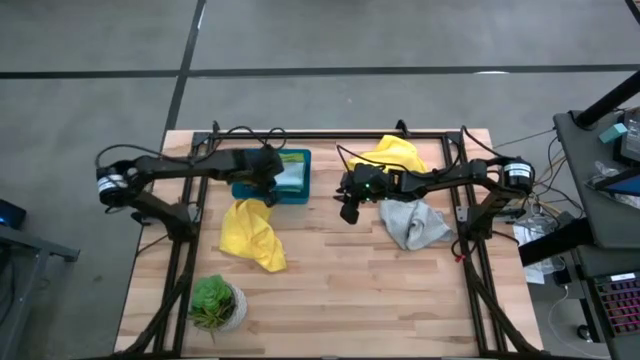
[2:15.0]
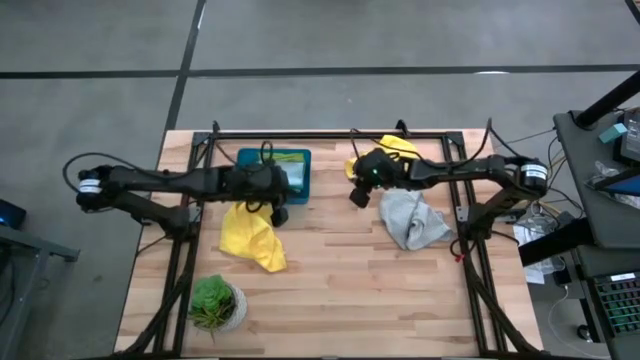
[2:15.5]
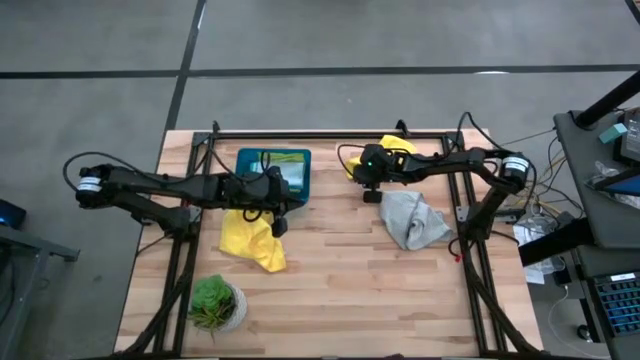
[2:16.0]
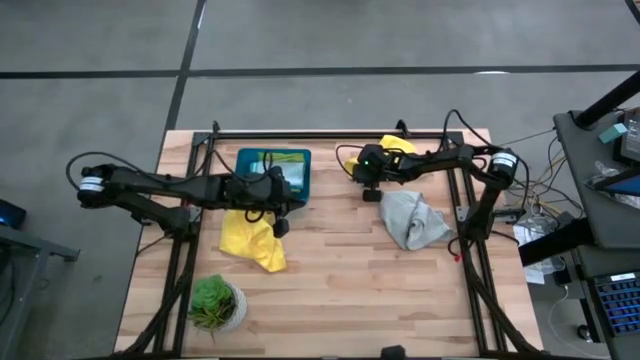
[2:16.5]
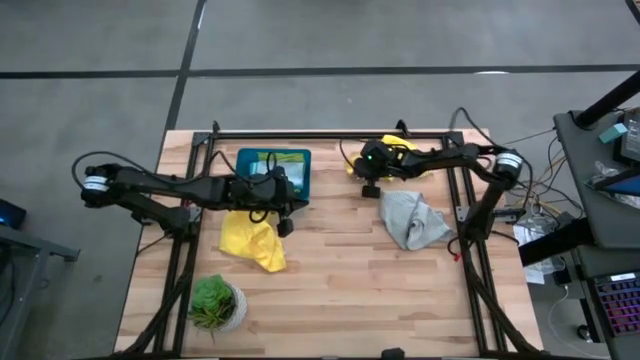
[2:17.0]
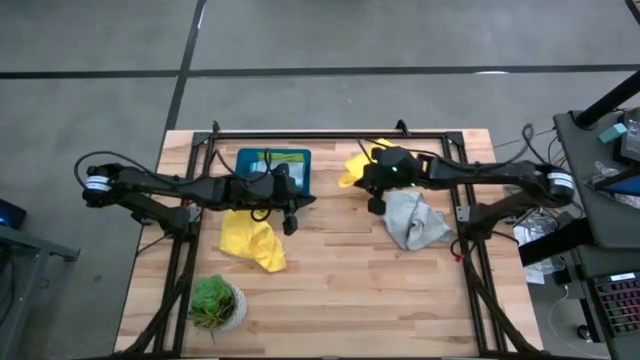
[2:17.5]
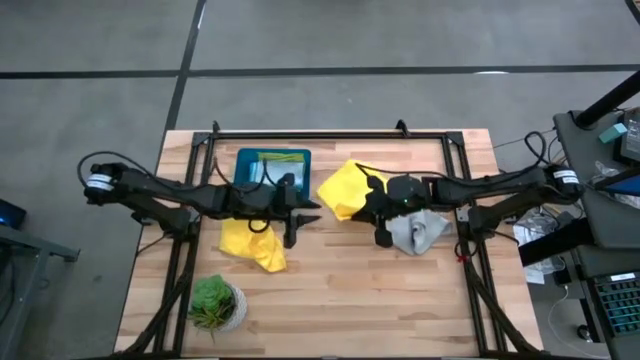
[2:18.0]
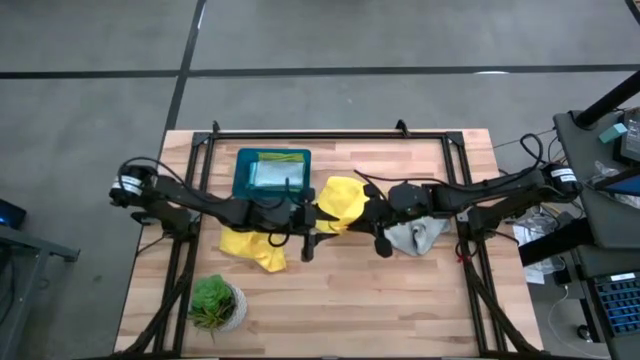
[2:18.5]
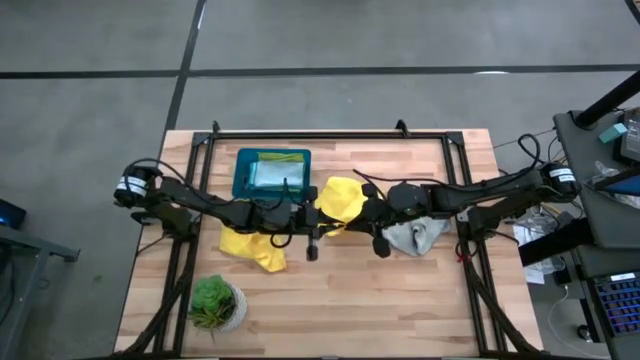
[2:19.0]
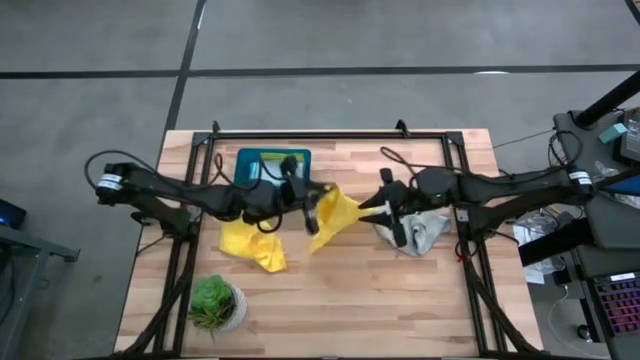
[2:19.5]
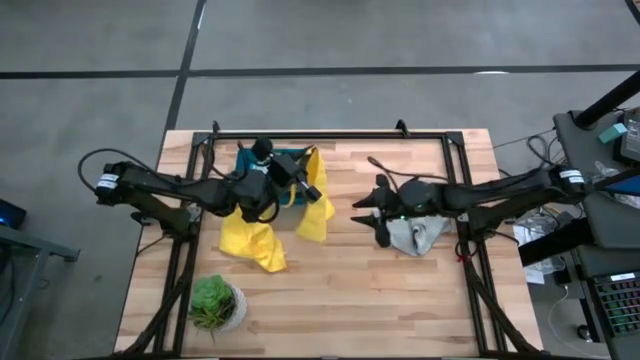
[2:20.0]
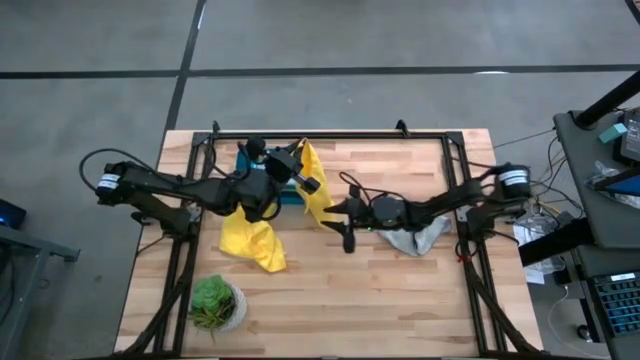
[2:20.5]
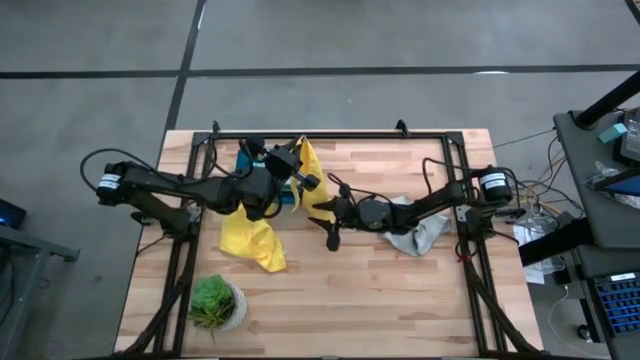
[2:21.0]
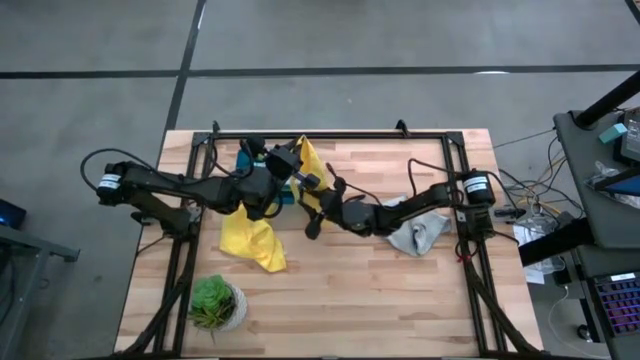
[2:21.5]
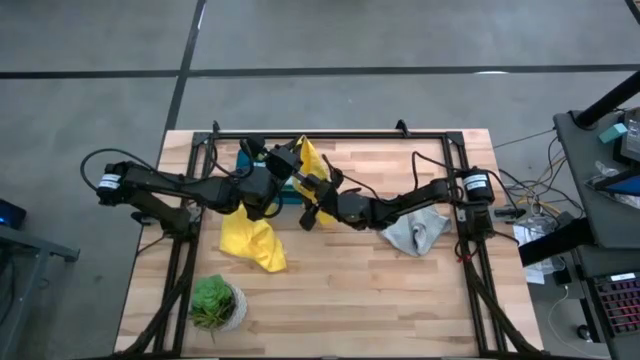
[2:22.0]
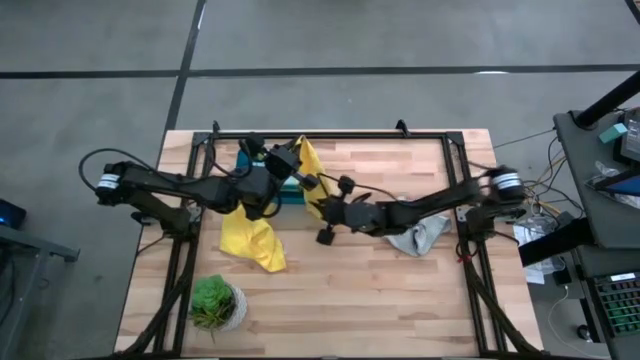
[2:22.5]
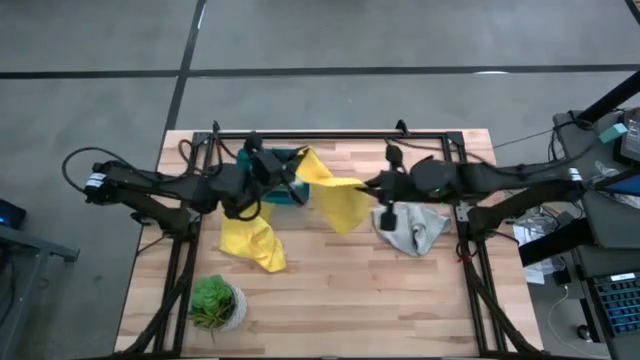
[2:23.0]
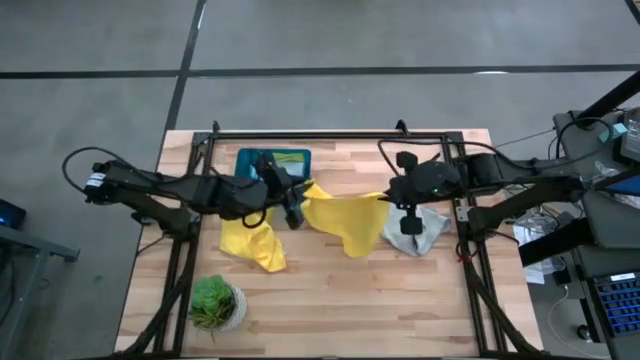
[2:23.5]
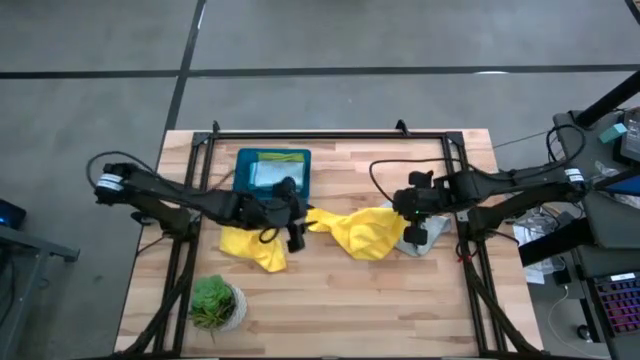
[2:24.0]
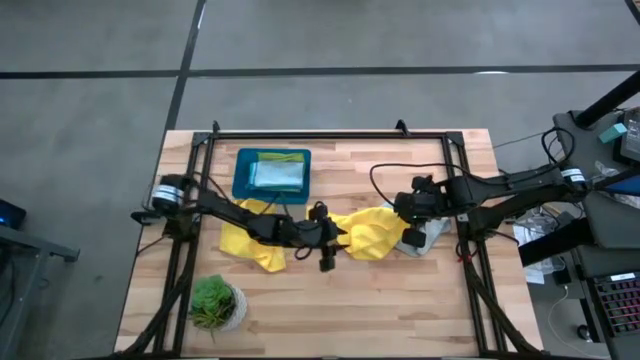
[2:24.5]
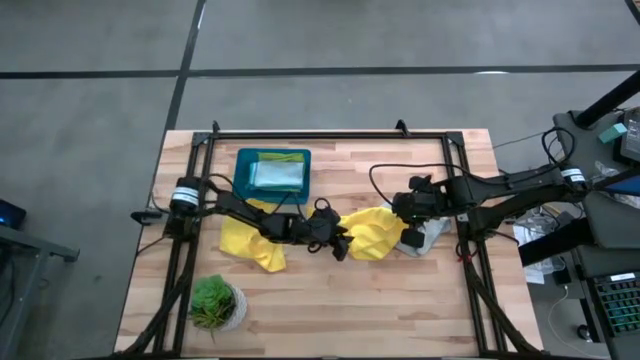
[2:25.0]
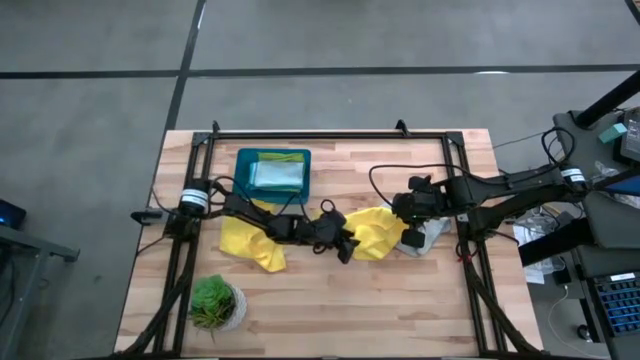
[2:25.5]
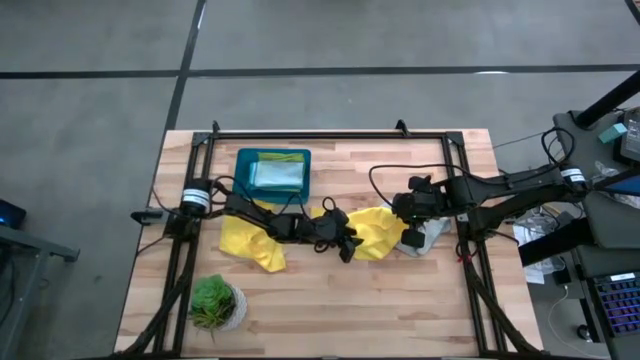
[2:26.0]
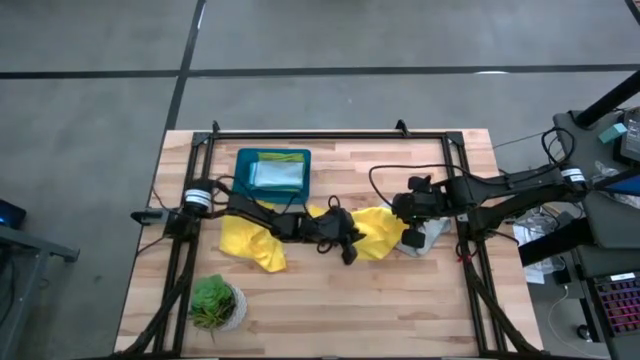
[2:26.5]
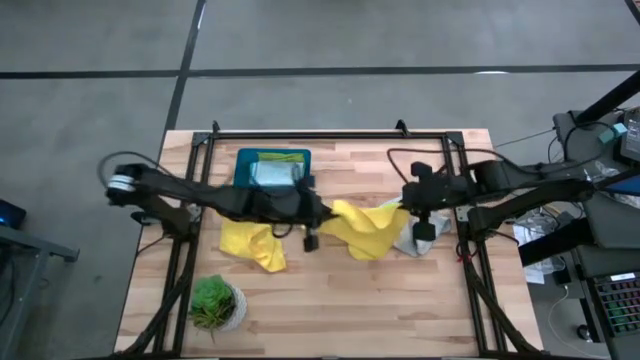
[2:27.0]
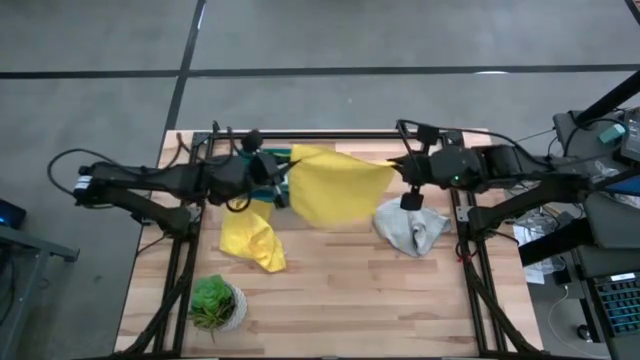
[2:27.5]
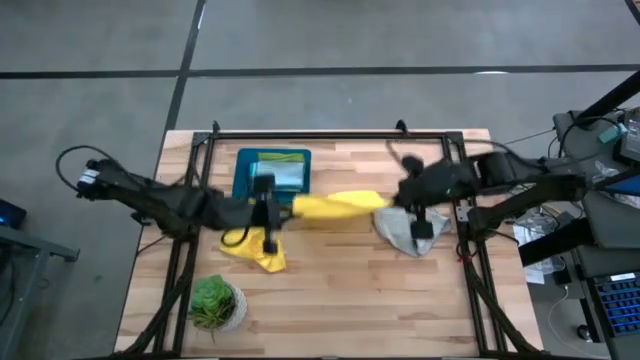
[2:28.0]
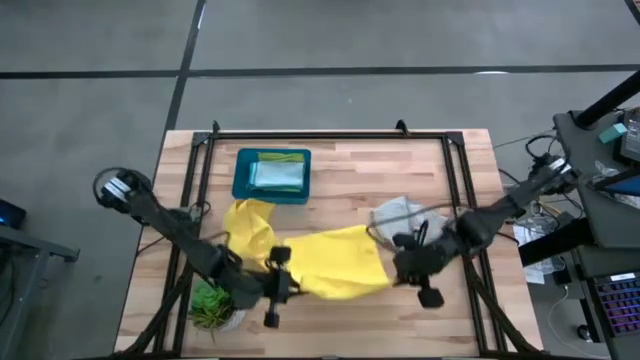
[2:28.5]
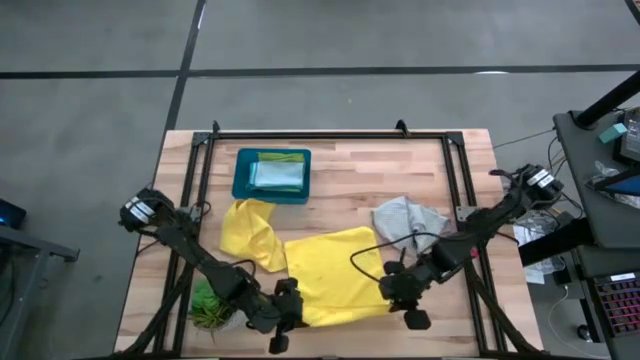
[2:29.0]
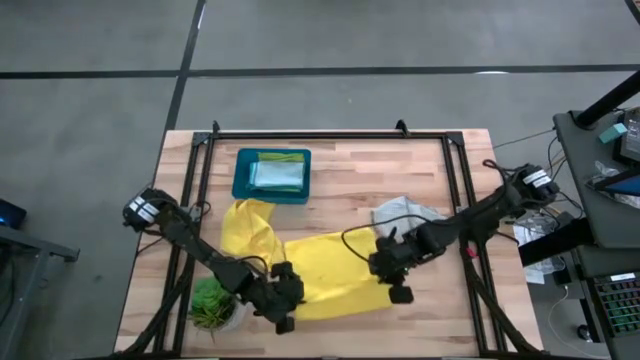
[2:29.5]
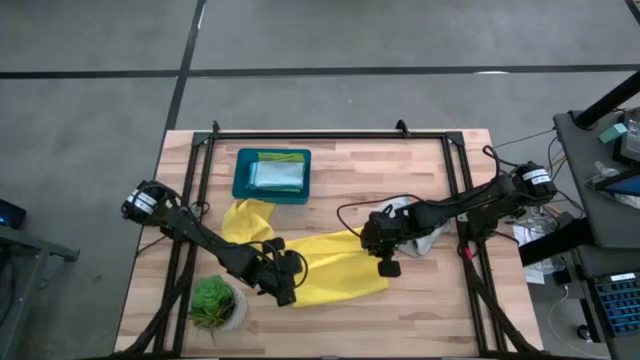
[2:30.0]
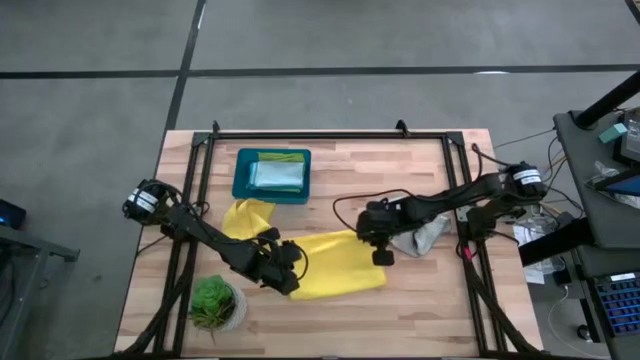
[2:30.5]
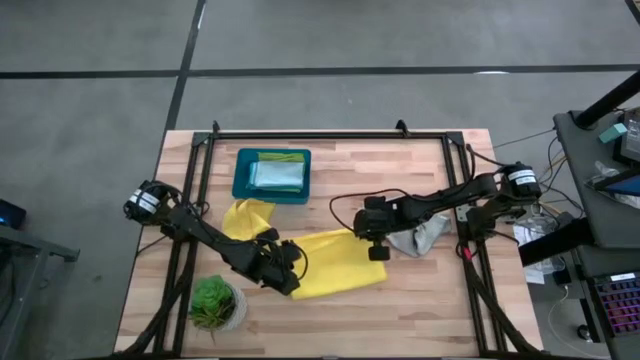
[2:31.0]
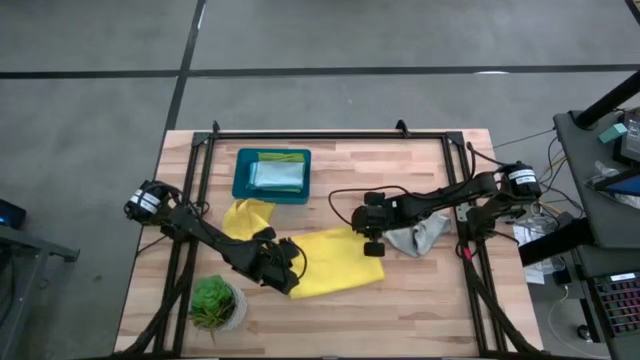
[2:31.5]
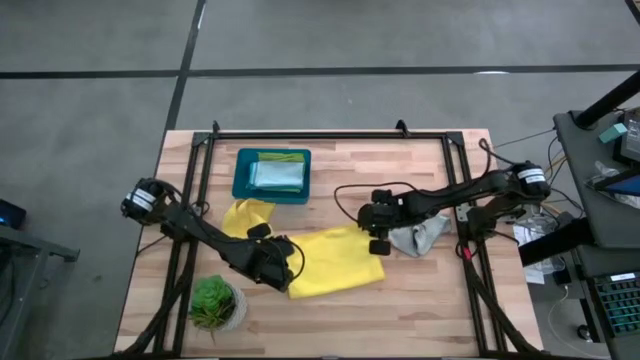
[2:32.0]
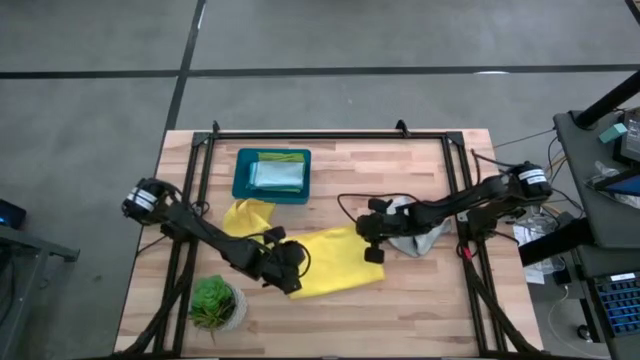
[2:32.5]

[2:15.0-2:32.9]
Task: Fold microfiber towels
Fold the right yellow microfiber towel

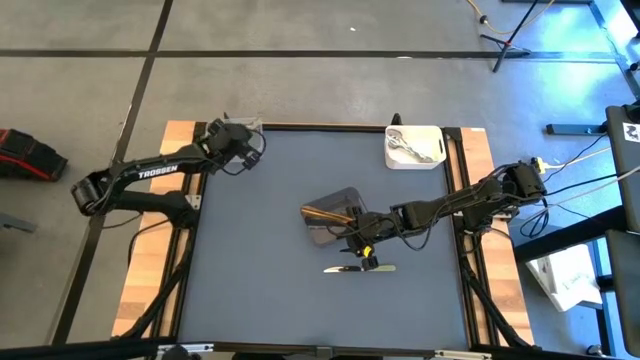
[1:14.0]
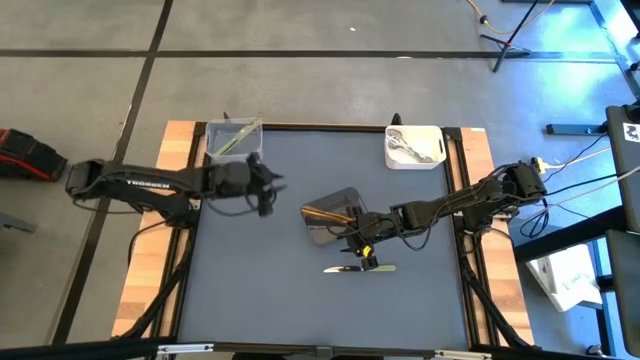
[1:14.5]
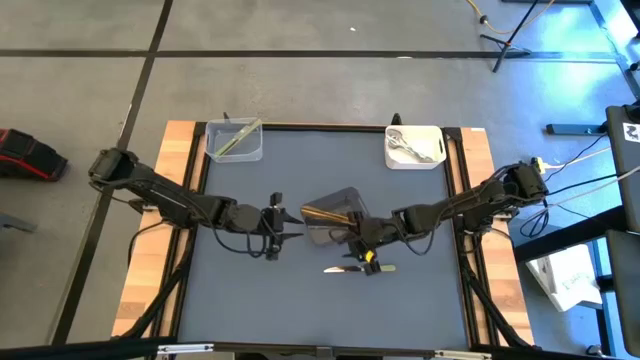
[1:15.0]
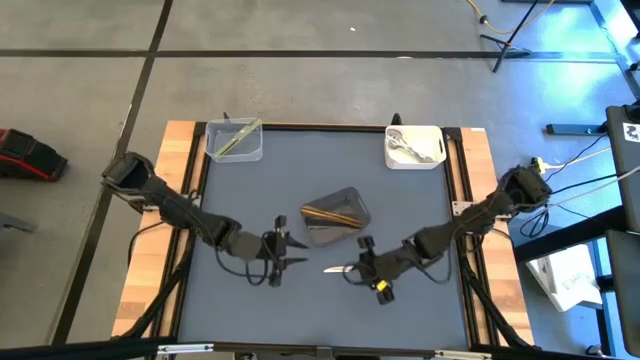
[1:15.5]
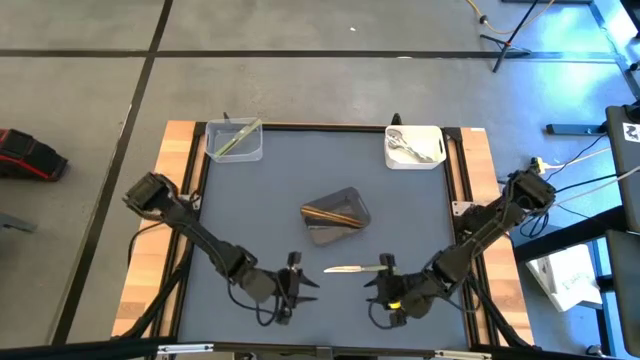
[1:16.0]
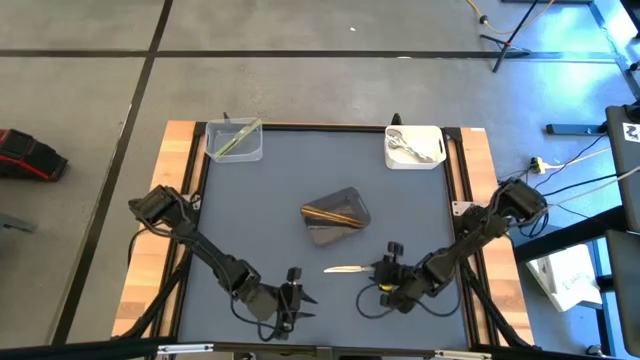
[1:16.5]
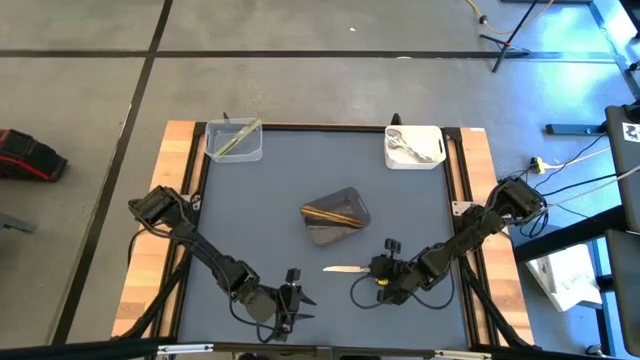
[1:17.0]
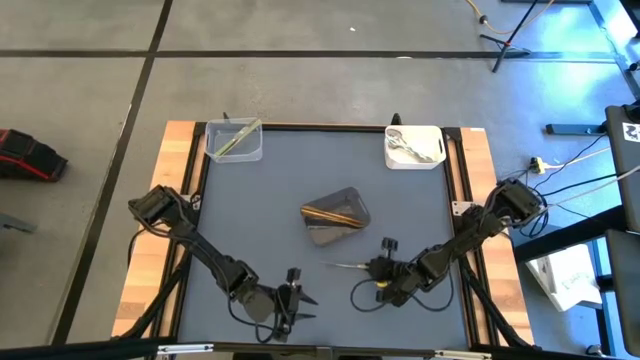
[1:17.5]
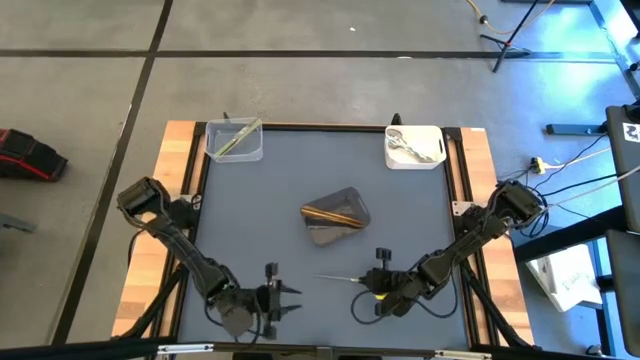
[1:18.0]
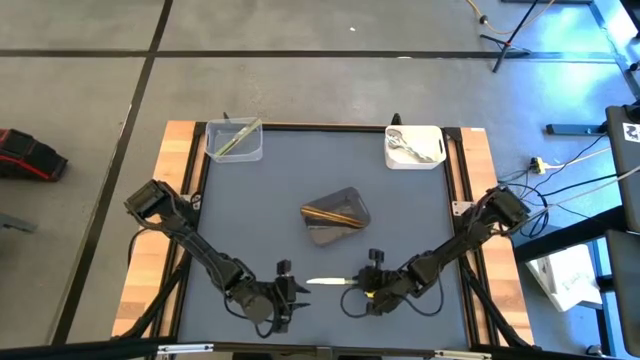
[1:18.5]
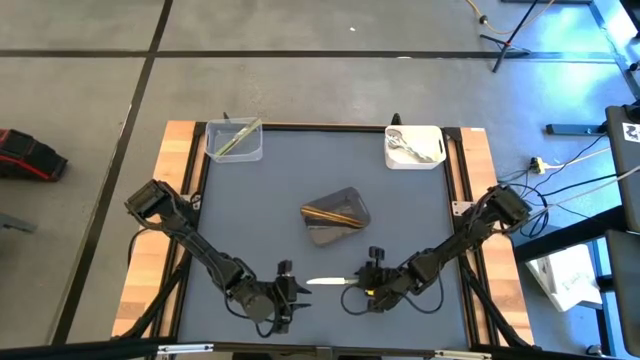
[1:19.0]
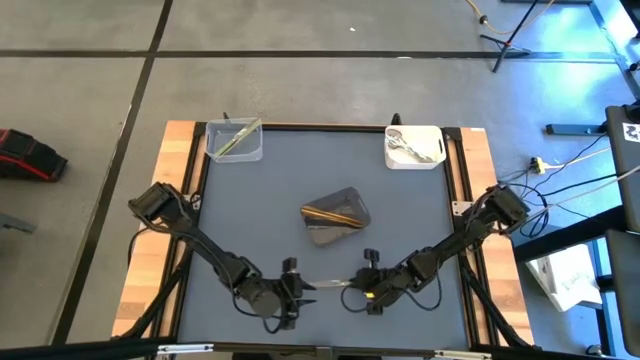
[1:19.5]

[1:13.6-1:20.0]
Task: Sort silverware by color (type)
Put the green table knife into the transparent bin
